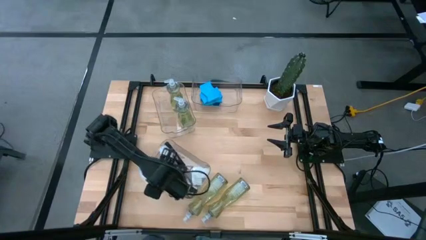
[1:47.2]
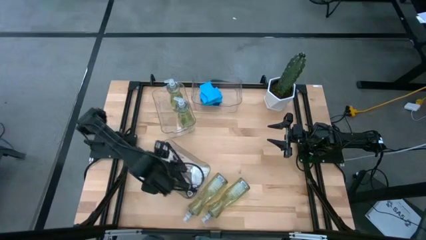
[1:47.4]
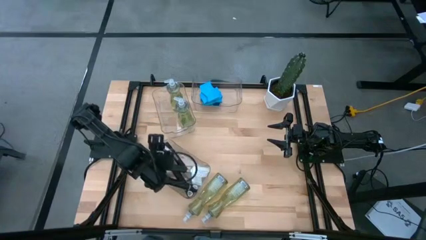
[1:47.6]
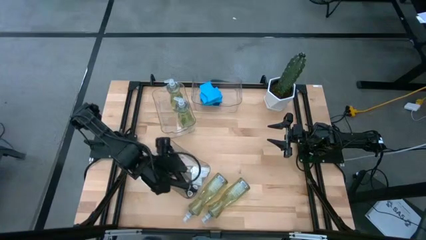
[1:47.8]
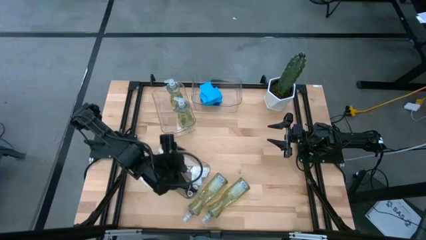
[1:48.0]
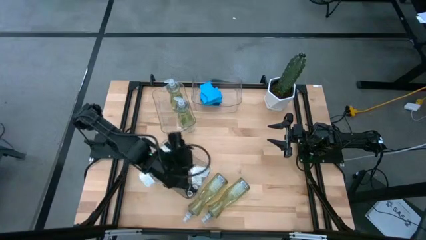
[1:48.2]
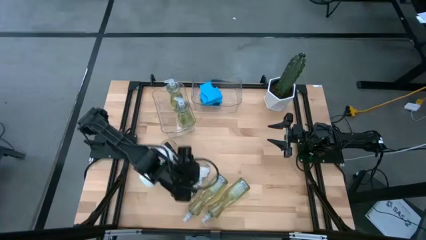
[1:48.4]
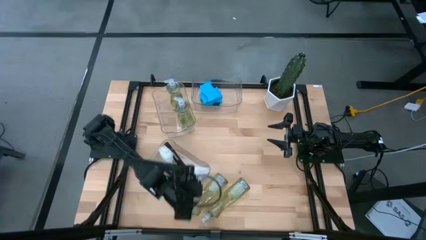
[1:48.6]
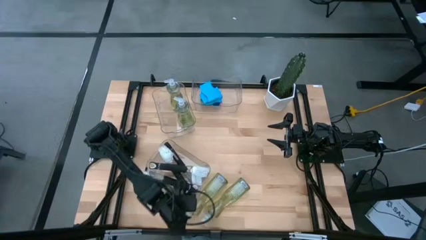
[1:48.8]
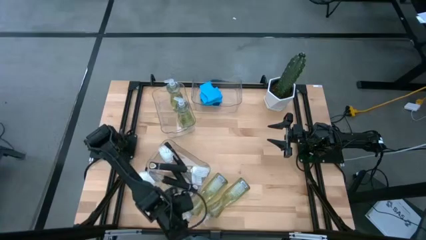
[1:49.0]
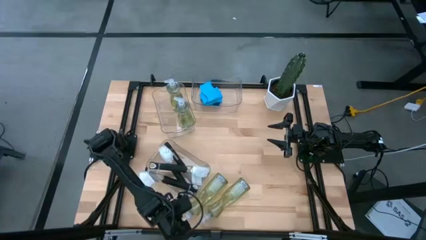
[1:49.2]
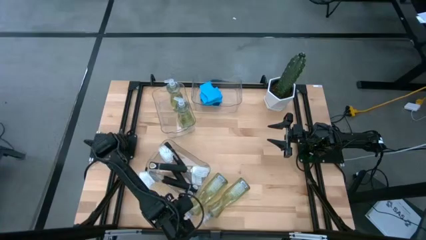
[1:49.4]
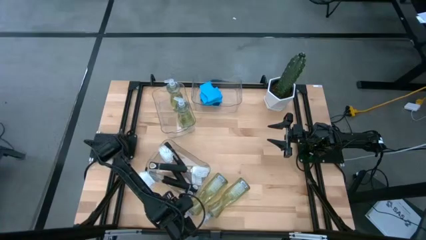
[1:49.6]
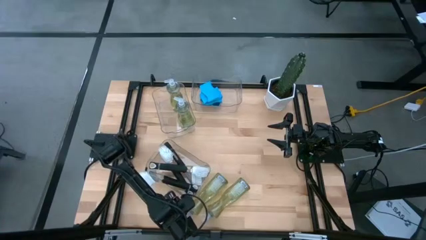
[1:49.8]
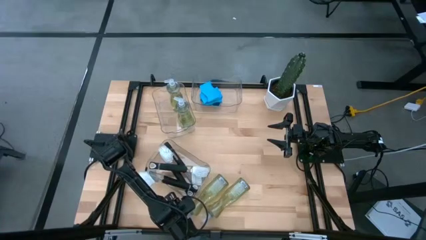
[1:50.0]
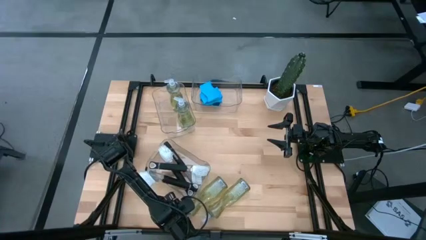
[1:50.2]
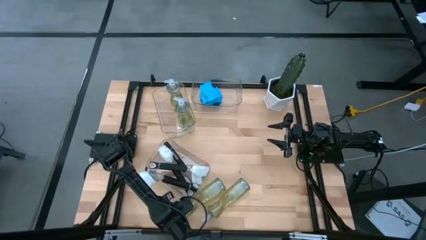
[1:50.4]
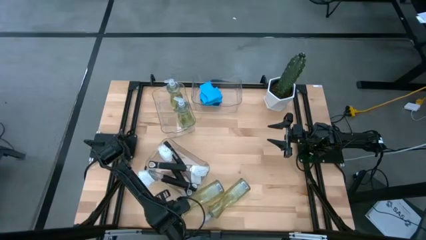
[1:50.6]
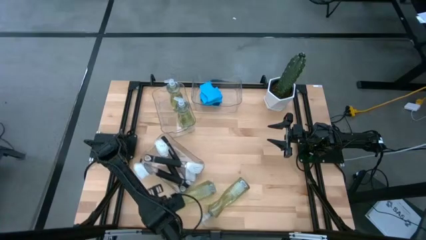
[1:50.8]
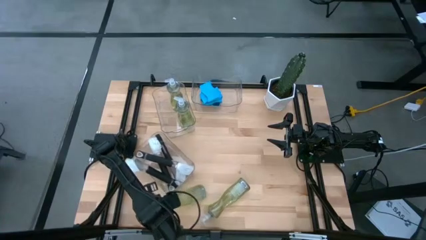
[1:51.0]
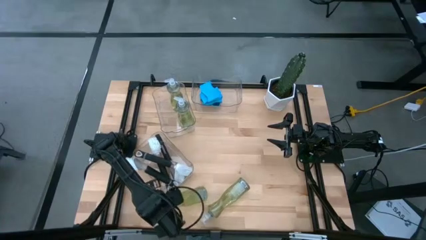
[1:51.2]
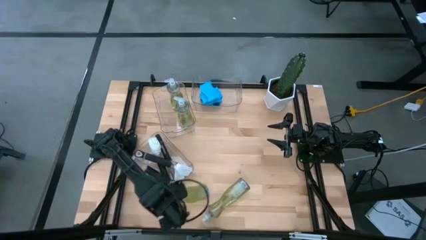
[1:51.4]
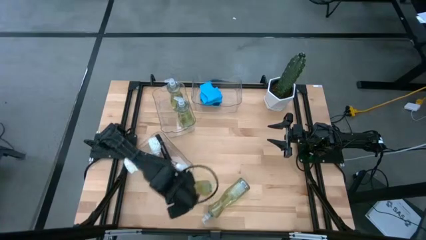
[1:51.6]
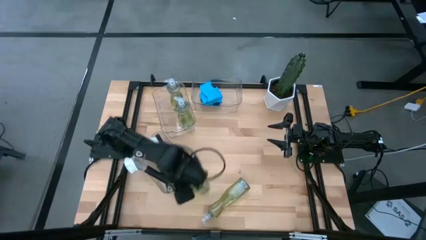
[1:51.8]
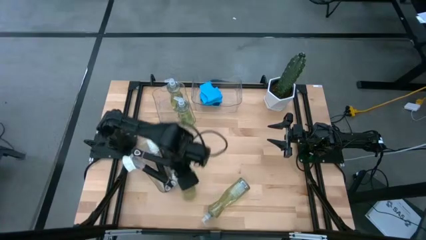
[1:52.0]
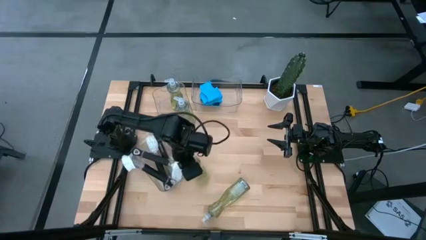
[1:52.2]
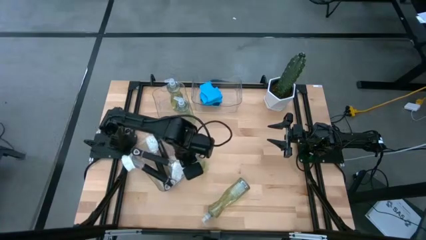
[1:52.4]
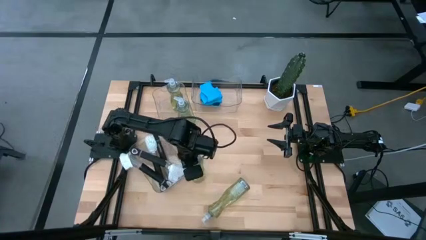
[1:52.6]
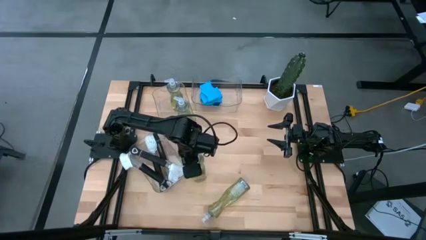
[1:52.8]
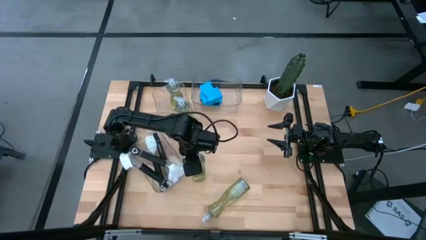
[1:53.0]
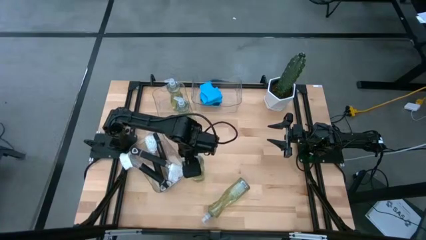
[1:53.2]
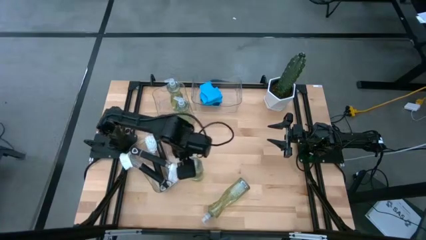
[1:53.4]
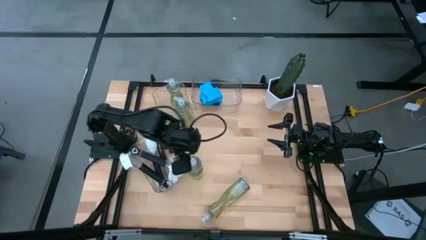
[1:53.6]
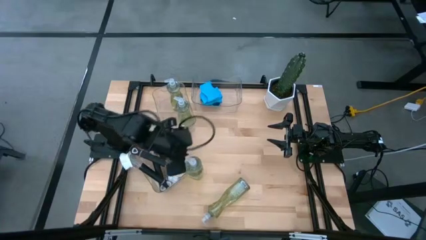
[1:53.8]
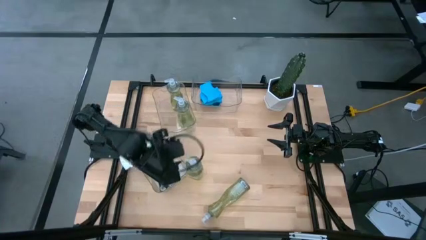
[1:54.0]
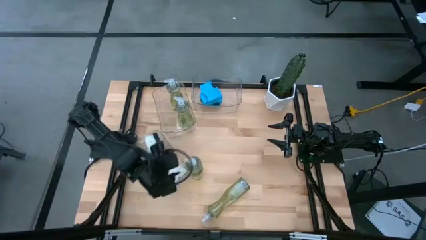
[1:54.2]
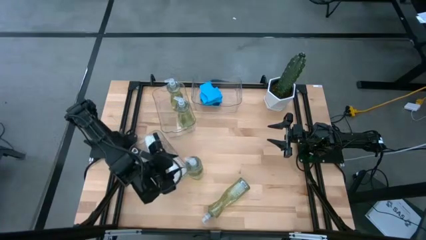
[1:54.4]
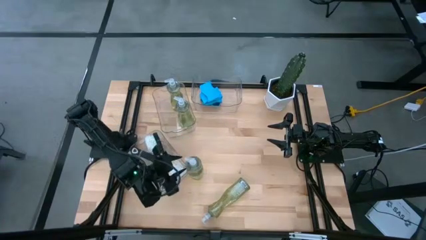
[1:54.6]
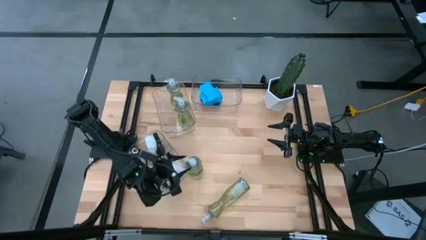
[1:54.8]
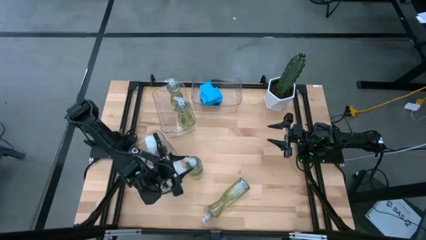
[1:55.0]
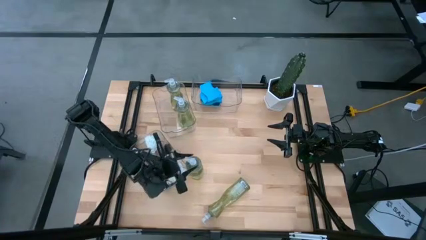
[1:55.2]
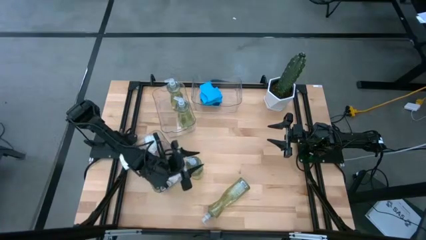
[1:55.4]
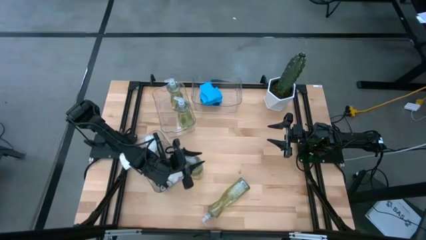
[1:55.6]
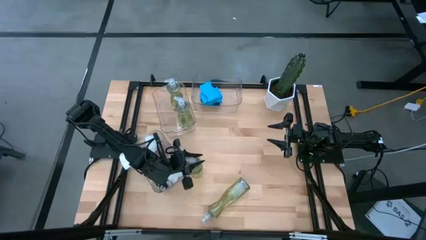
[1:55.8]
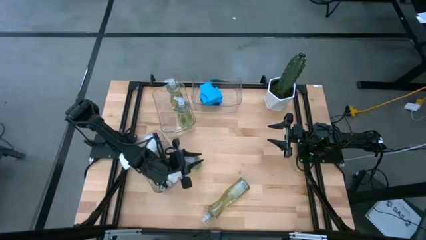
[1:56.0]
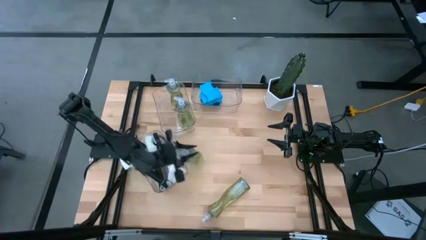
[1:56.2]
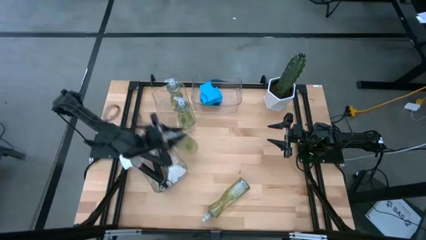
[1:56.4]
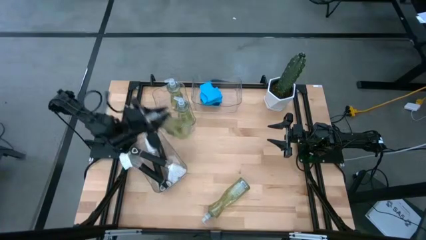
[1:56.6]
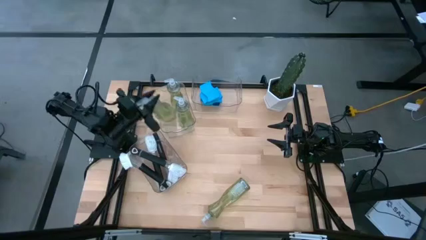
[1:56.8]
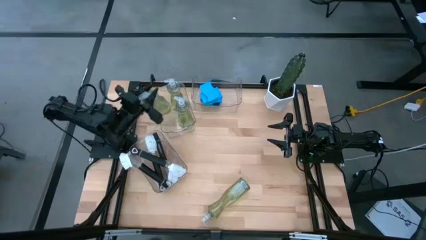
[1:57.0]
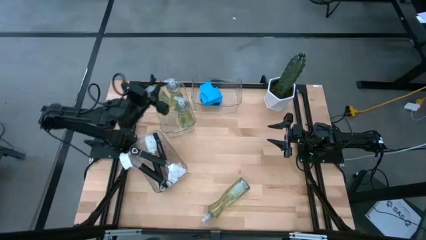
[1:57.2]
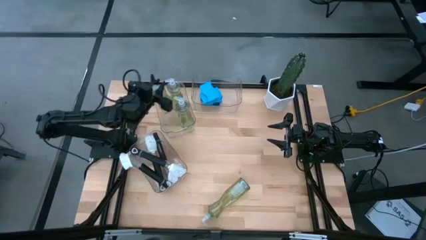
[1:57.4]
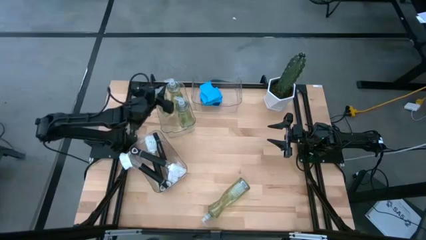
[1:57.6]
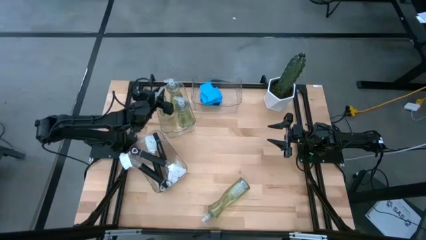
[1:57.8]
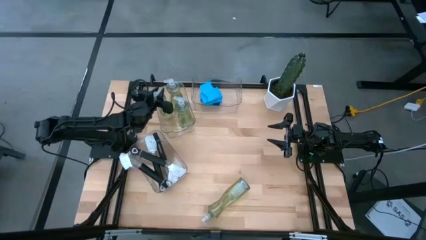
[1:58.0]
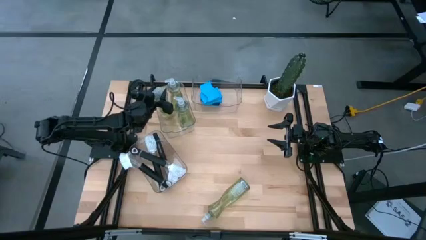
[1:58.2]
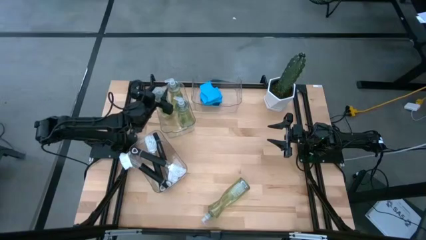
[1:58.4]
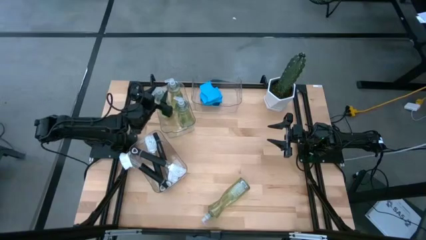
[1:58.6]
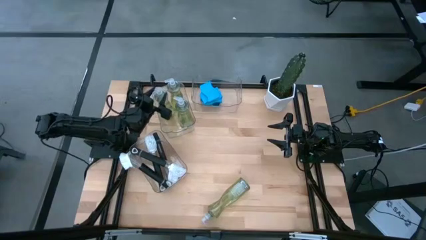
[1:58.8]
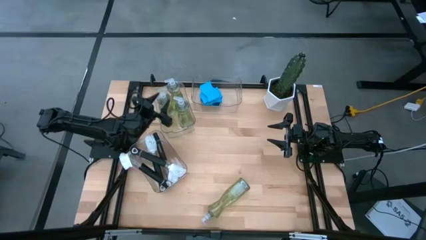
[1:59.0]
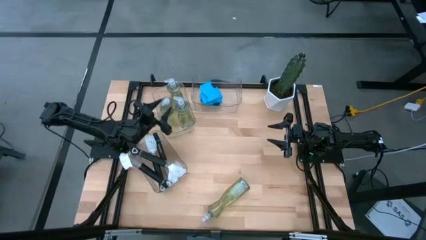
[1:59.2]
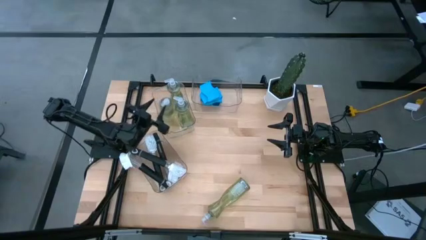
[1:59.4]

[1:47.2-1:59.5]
Task: Pick & Place Kitchen Sink Supplies
Put the yellow dishwashing liquid bottle into the top left transparent bin

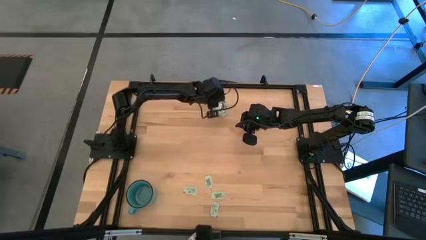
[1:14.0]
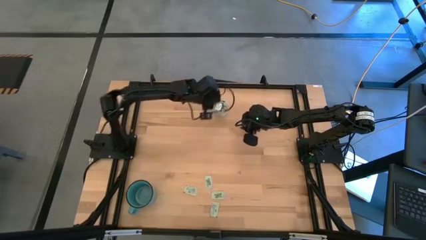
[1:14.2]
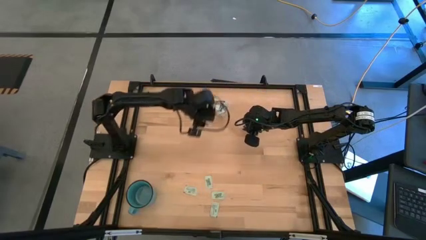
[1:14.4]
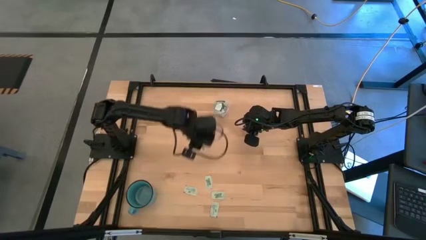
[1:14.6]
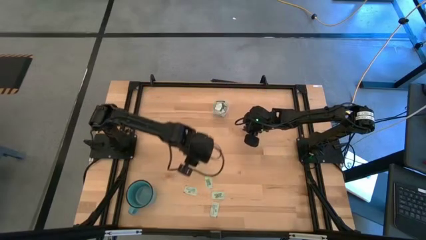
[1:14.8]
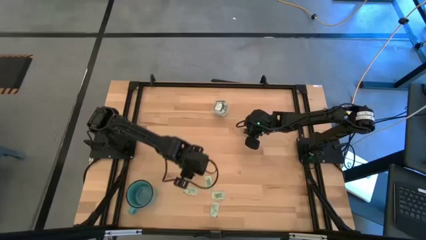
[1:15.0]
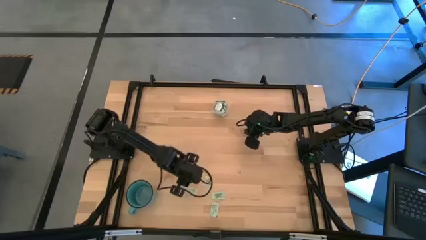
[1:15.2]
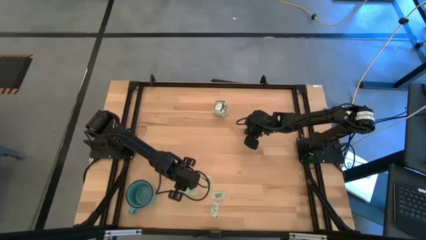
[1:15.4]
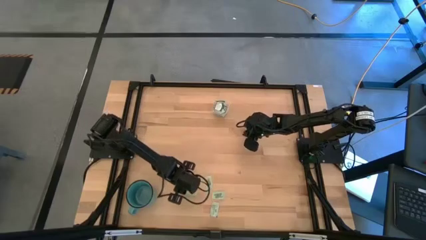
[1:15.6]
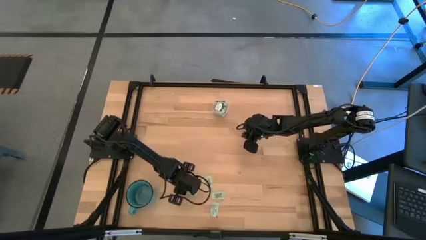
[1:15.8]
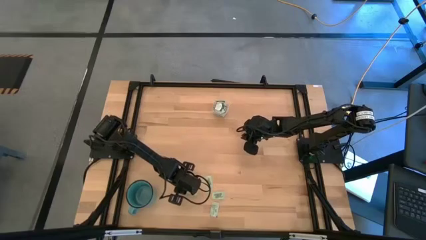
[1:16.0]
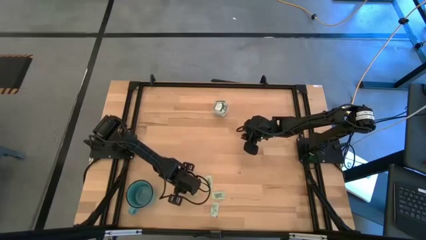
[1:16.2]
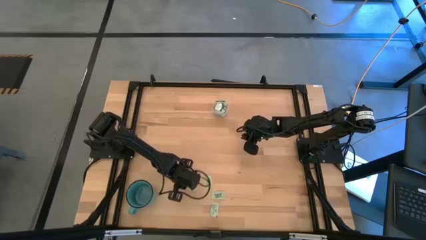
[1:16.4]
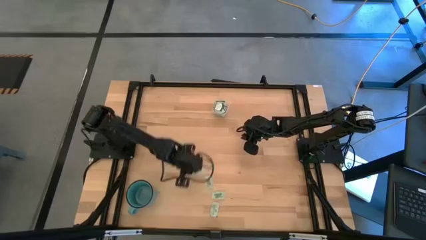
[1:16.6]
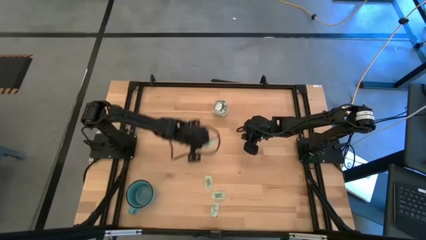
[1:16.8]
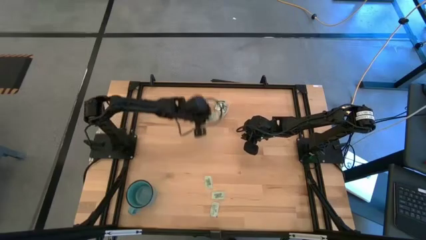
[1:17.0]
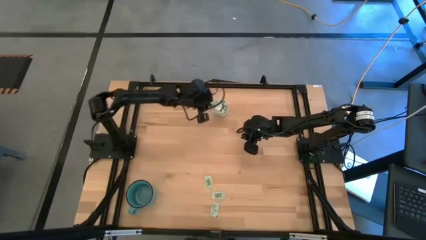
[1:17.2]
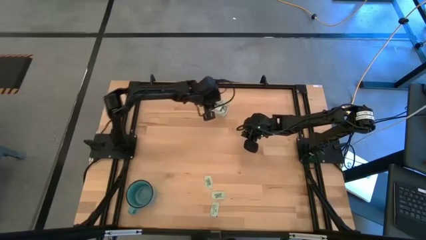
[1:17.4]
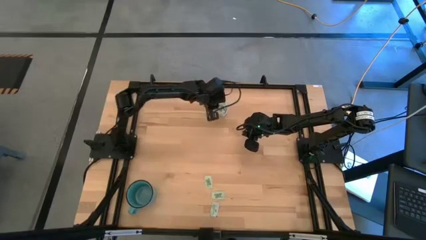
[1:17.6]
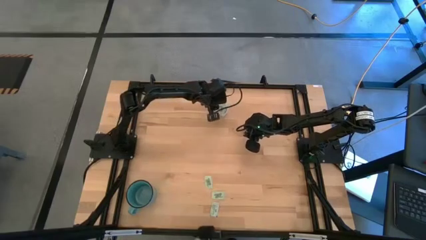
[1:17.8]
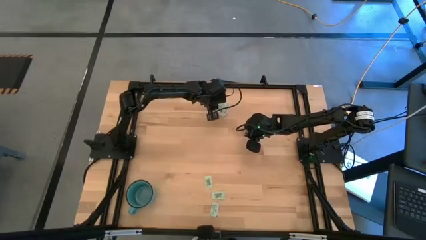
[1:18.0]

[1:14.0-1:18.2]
Task: Pick and place items into bin
Put the light green stevia packet into the transparent bin
